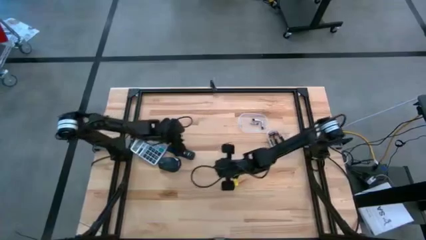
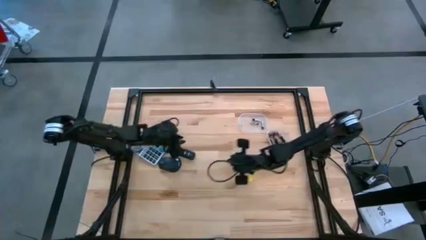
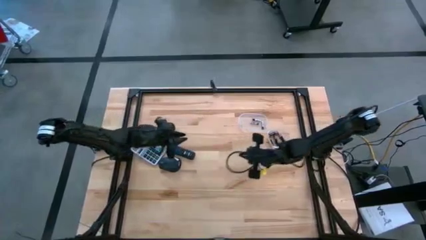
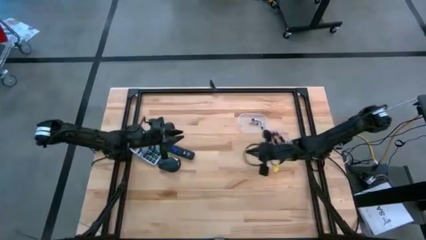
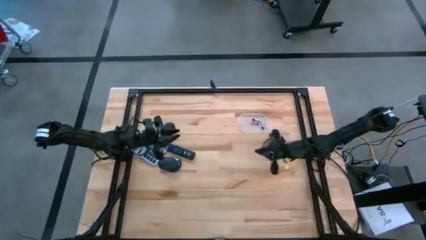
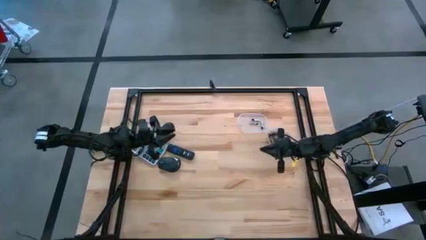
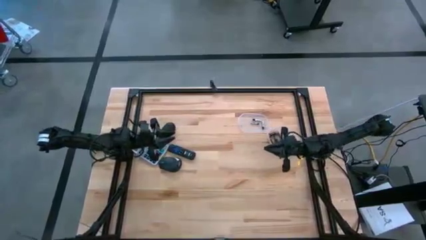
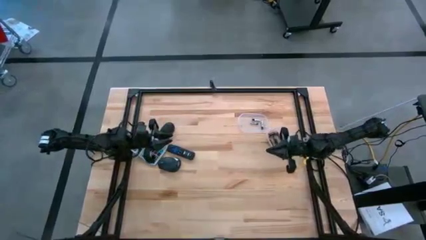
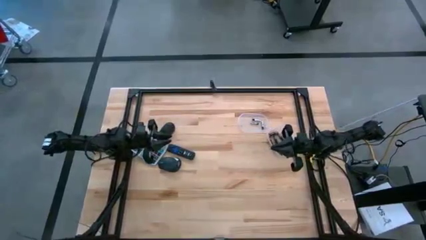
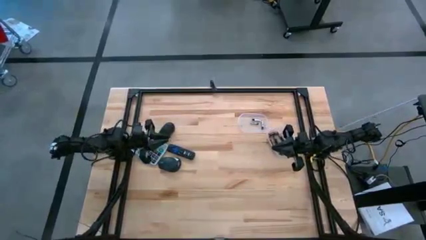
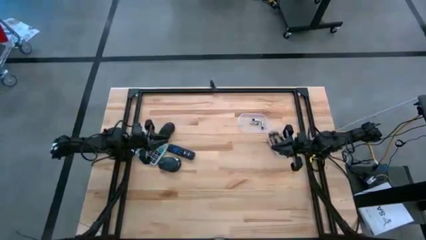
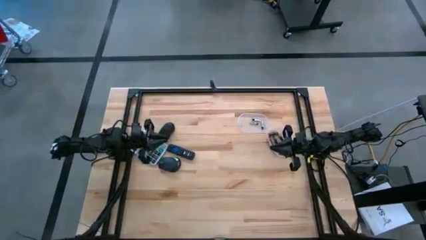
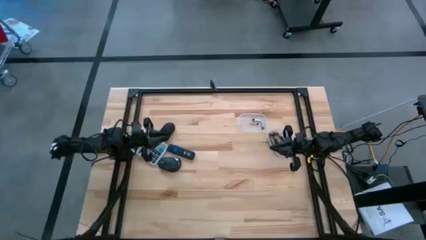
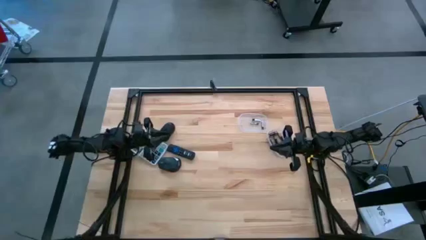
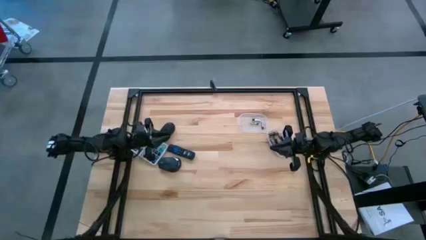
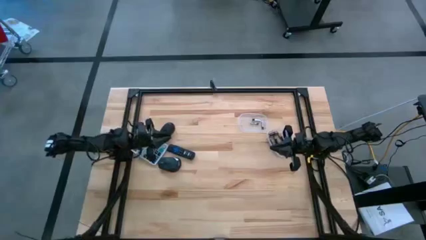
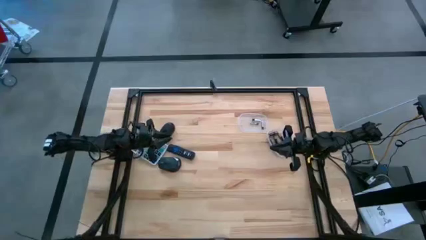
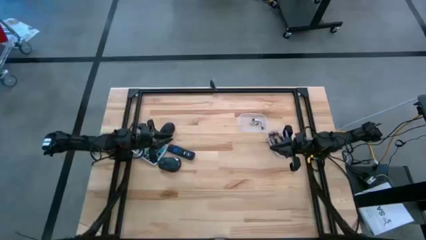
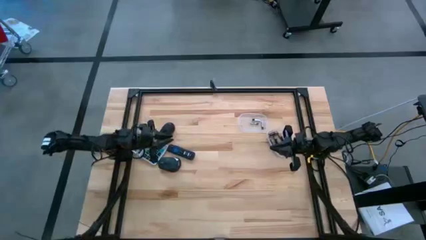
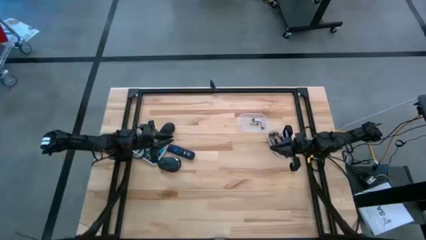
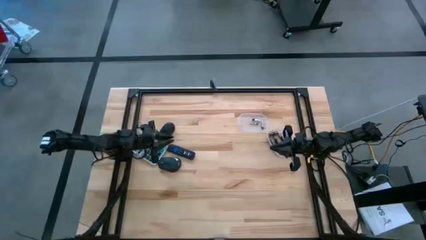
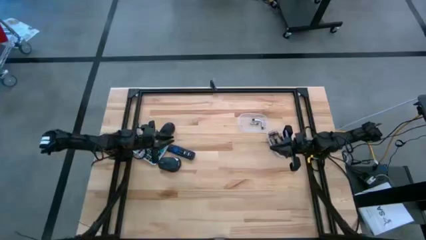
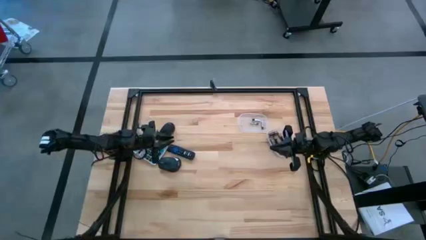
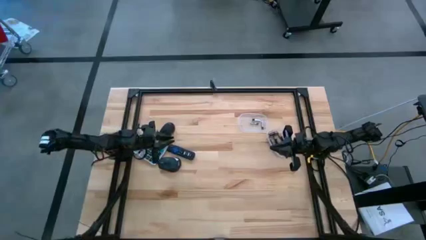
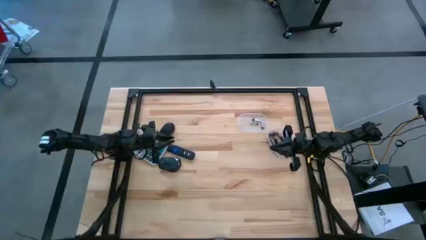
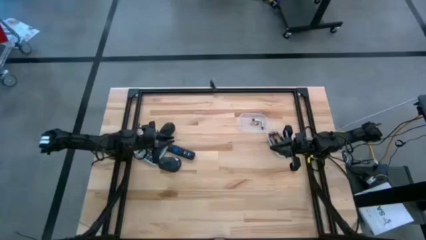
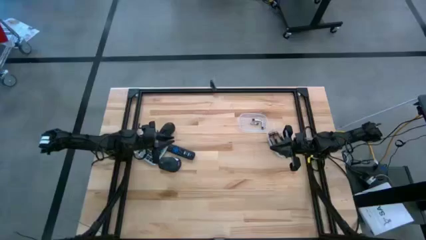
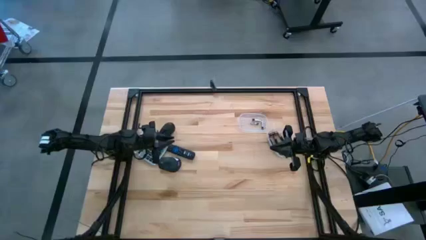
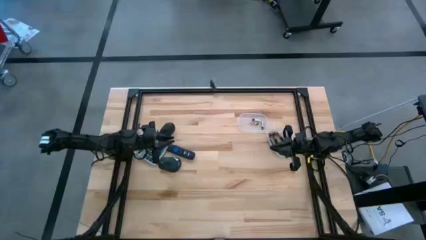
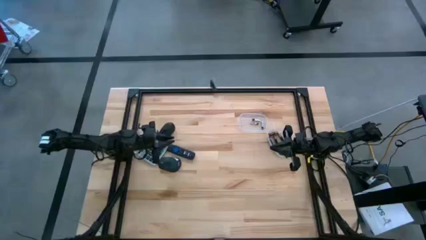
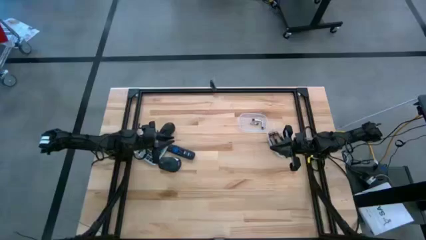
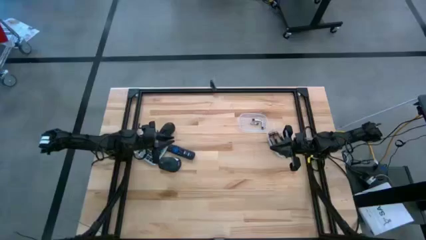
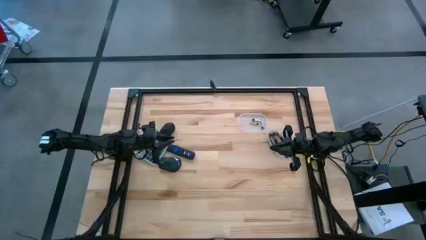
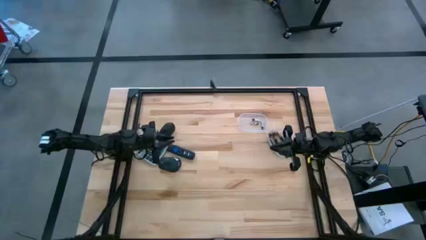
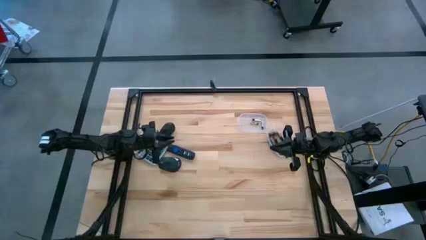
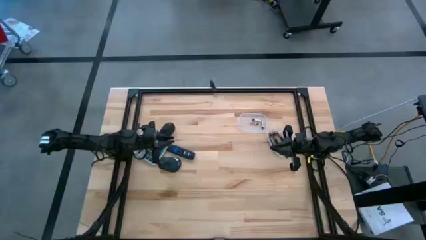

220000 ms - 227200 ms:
Task: Insert battery
Return to Home Position

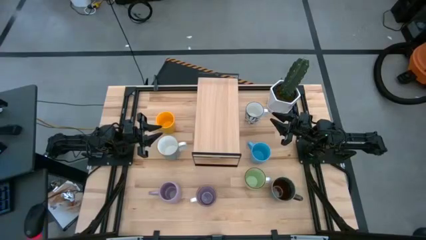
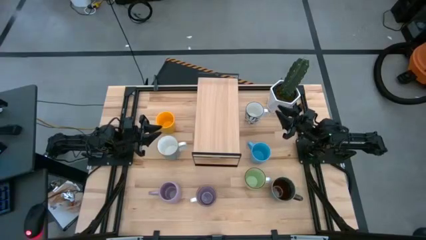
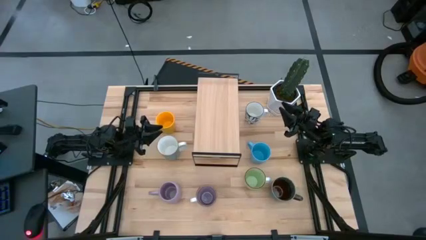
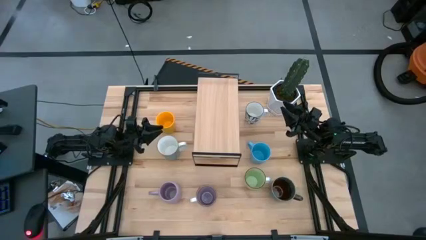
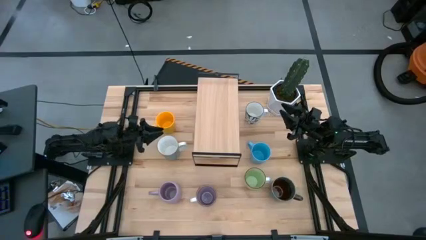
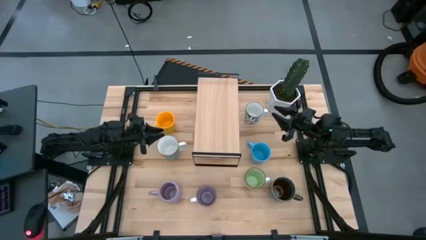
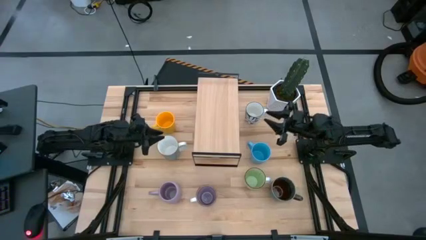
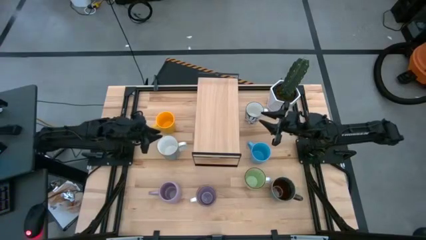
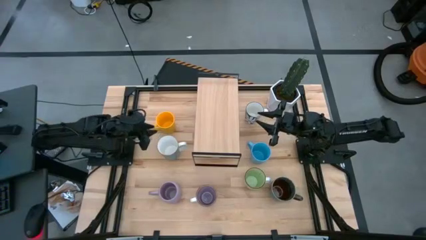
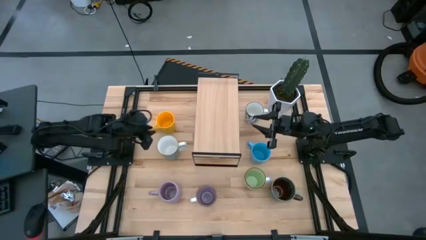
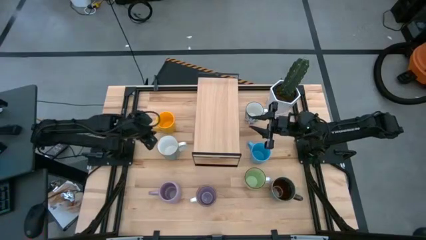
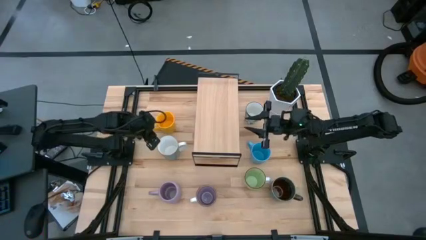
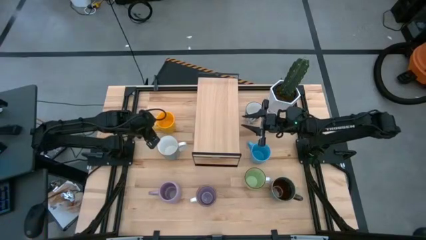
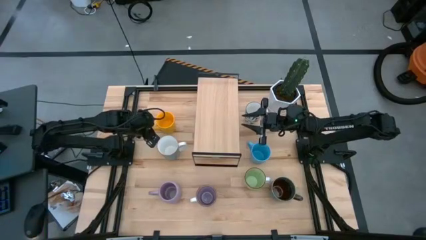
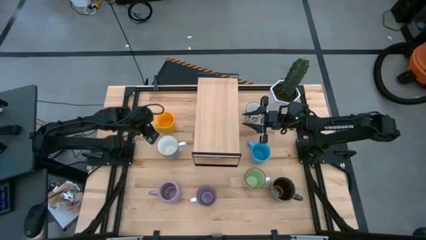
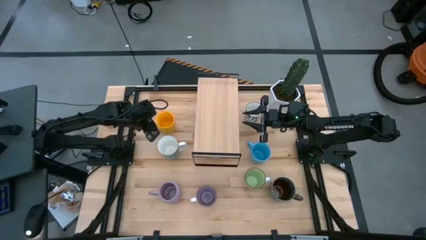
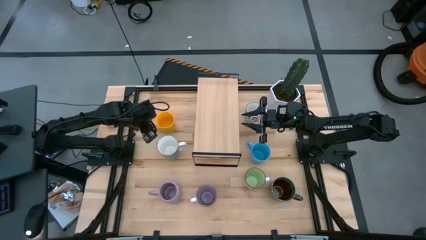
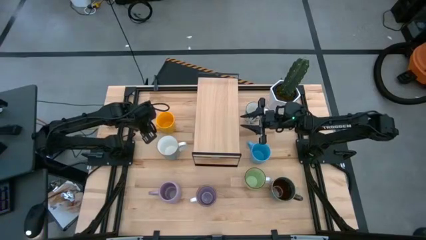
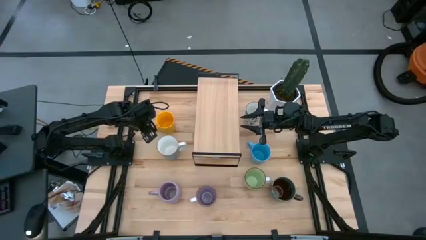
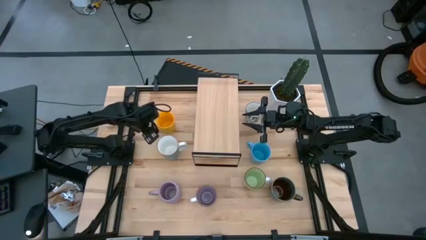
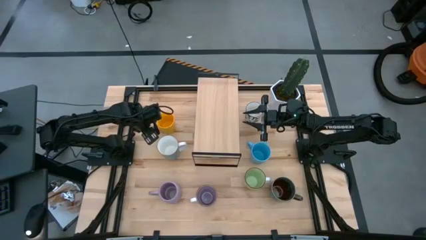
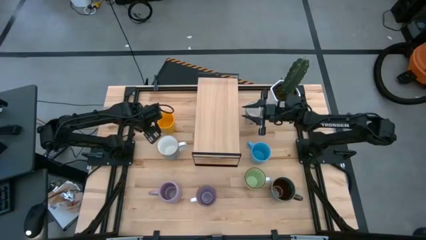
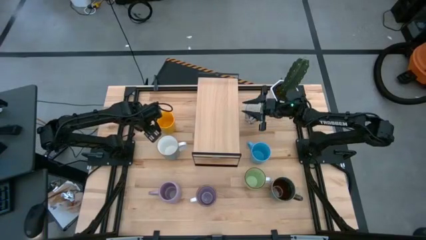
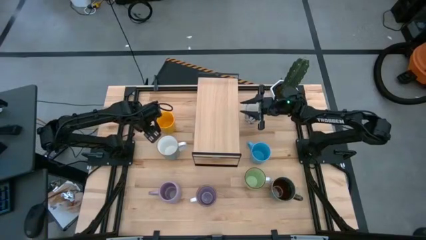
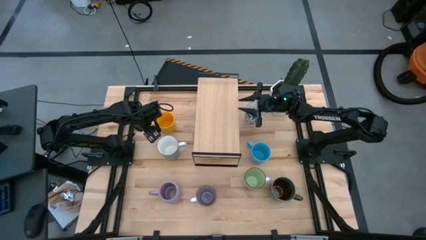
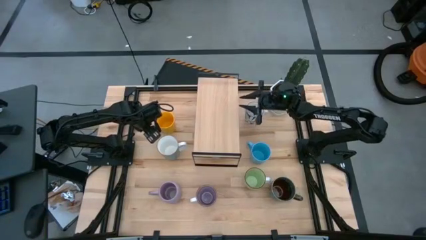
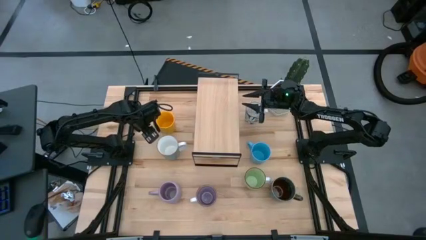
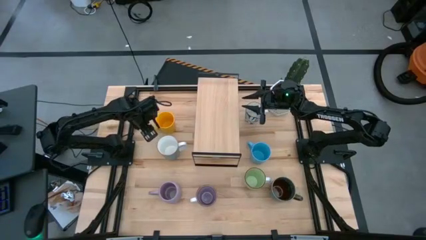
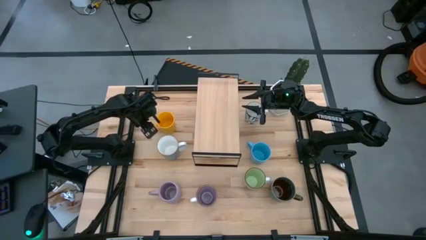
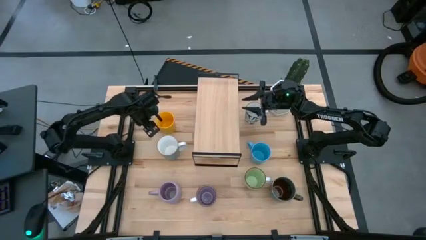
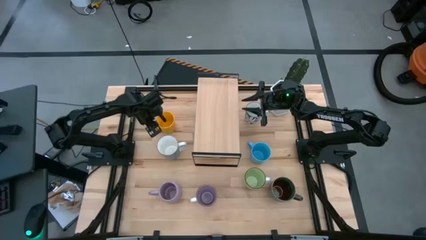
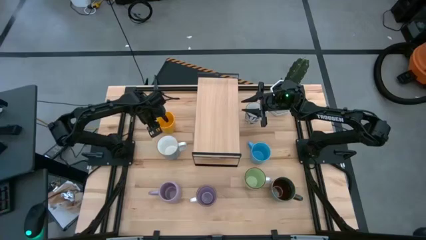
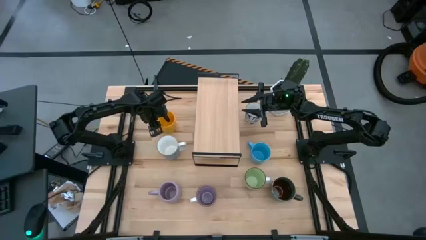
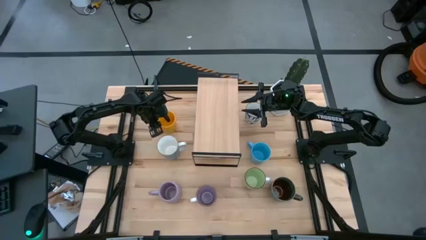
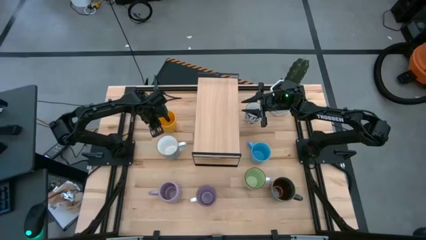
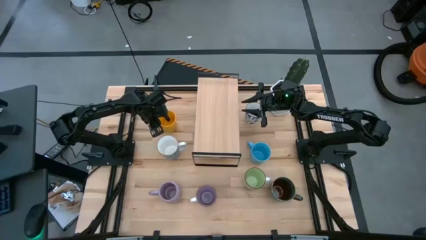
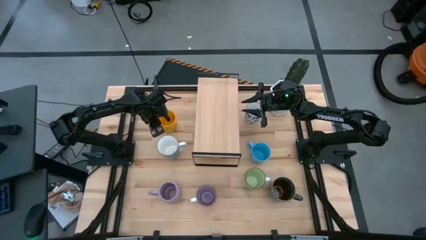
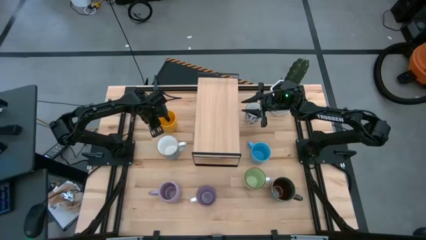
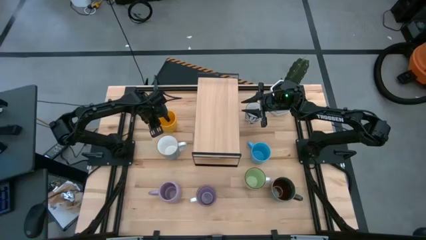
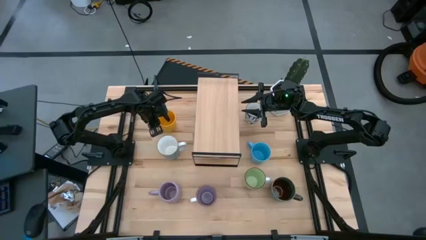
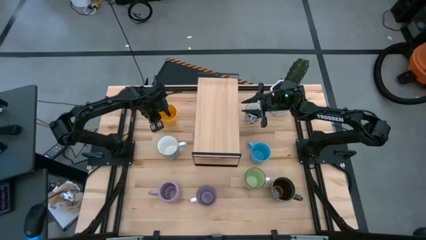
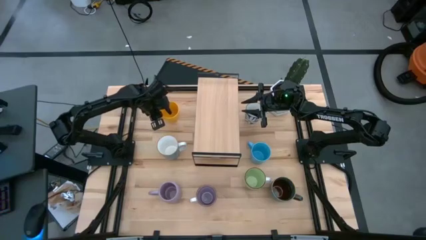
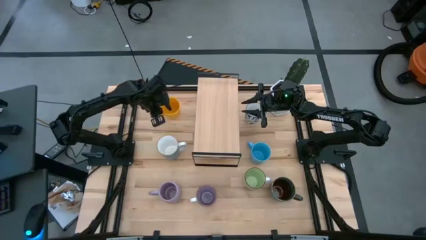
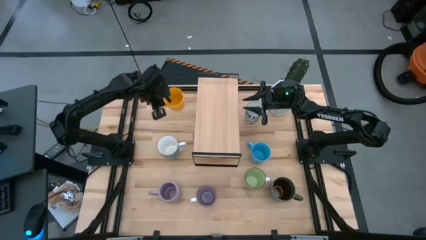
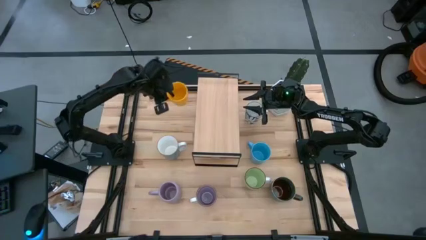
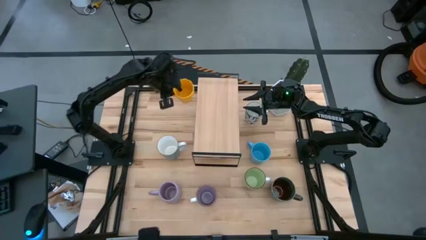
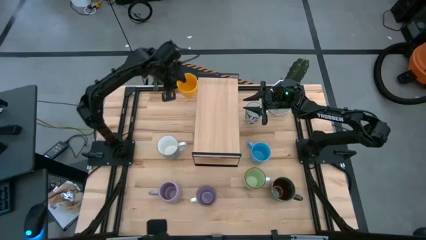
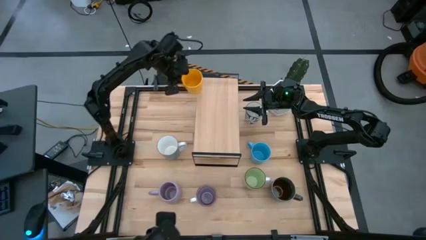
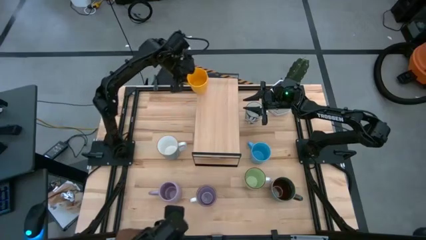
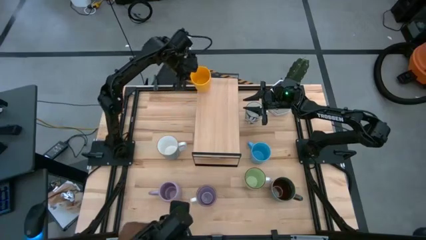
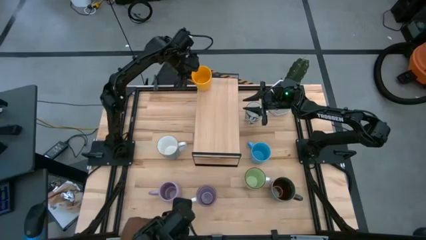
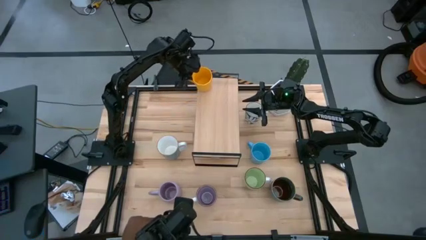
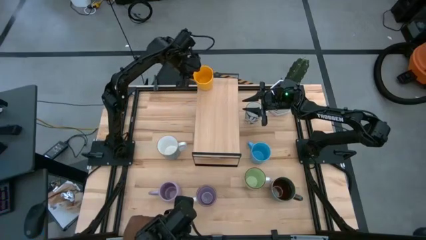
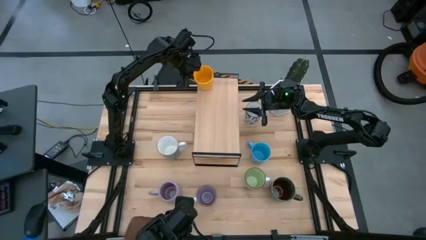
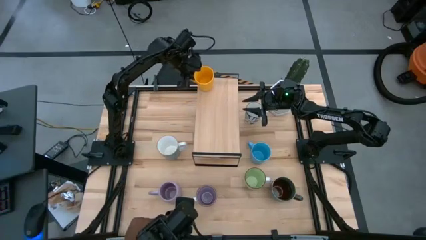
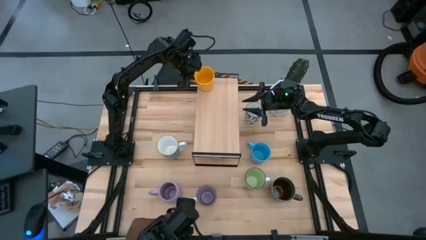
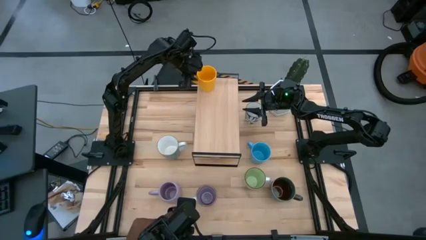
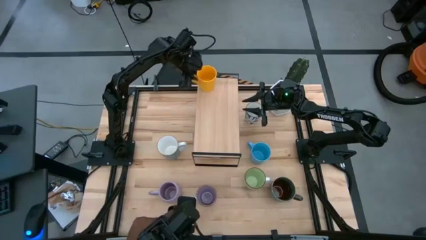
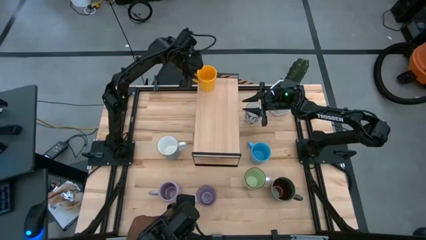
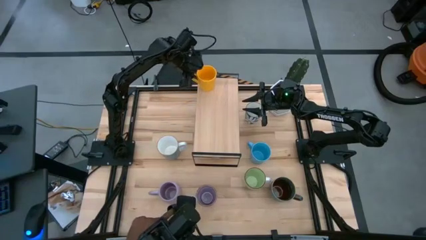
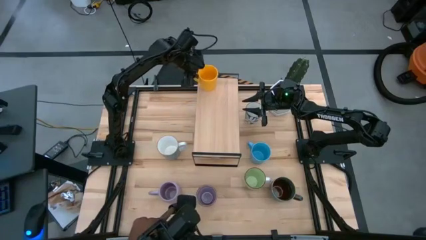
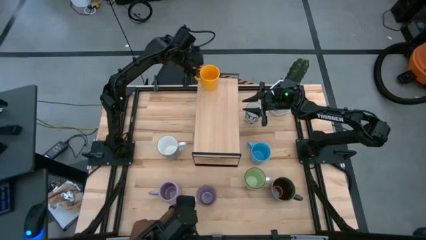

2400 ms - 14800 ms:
Task: Place coffee mugs
Put the yellow mug on the shelf
